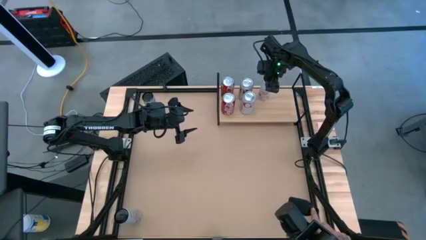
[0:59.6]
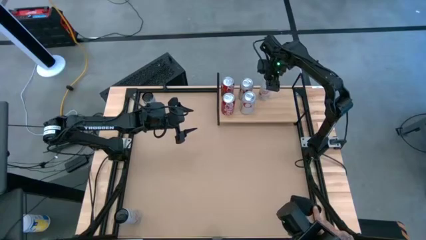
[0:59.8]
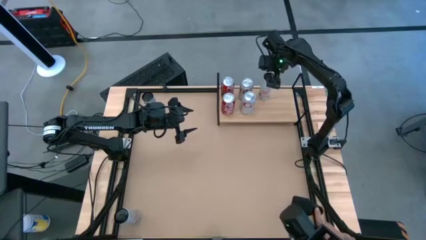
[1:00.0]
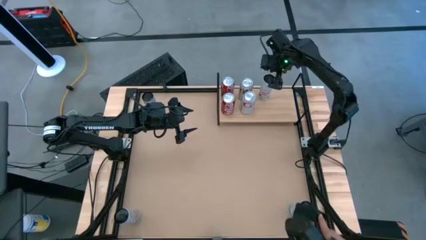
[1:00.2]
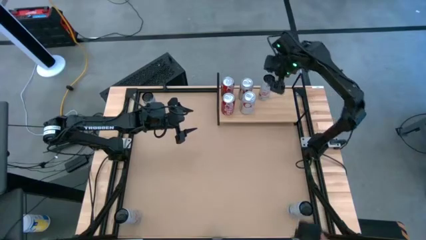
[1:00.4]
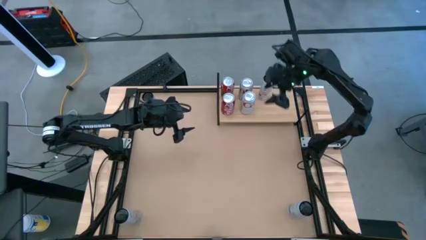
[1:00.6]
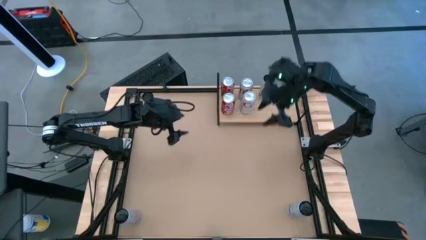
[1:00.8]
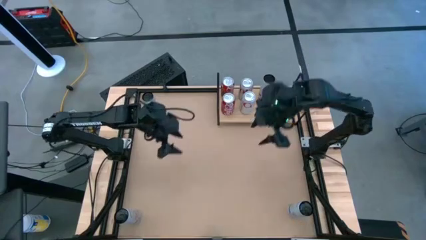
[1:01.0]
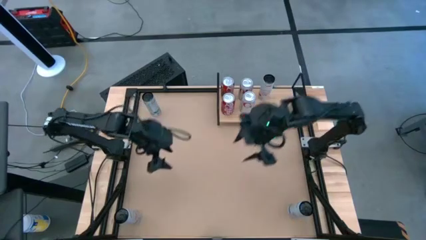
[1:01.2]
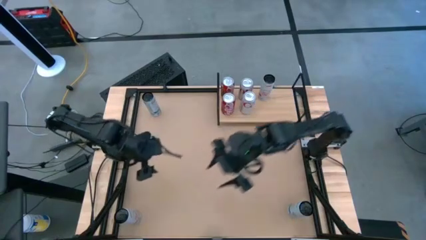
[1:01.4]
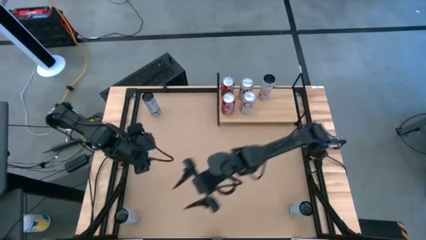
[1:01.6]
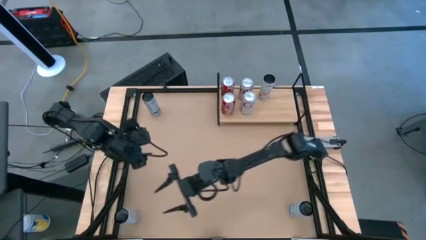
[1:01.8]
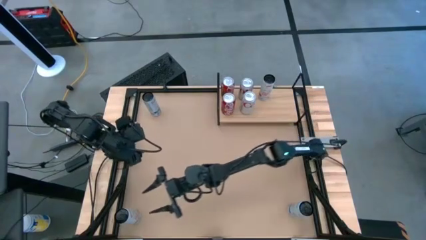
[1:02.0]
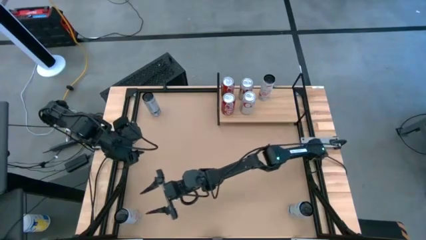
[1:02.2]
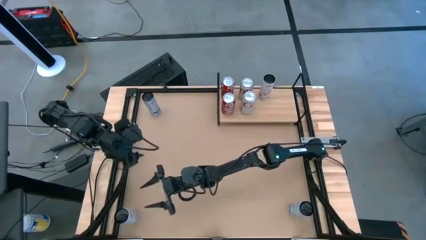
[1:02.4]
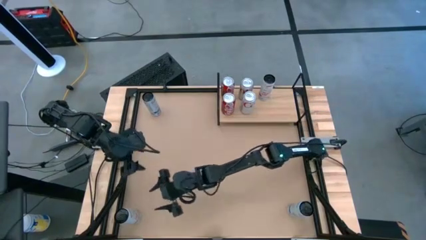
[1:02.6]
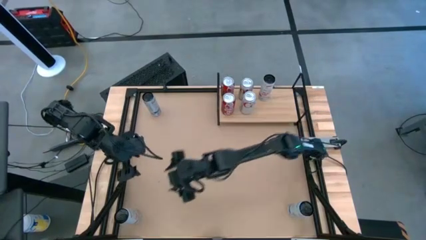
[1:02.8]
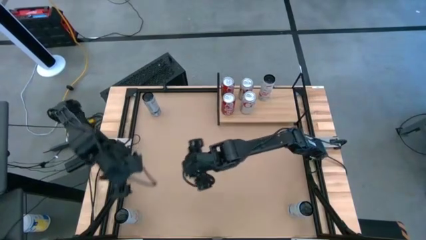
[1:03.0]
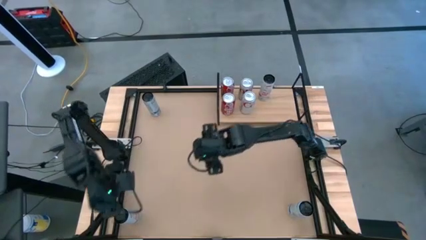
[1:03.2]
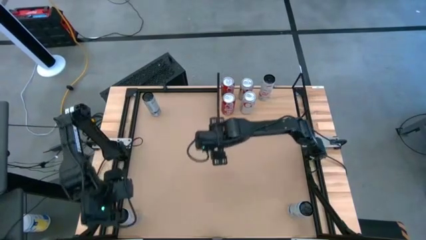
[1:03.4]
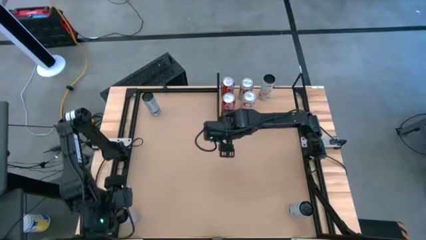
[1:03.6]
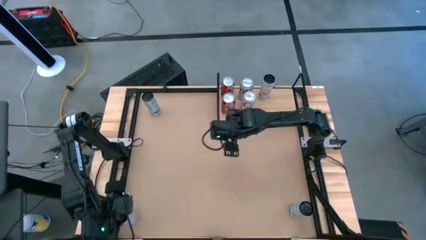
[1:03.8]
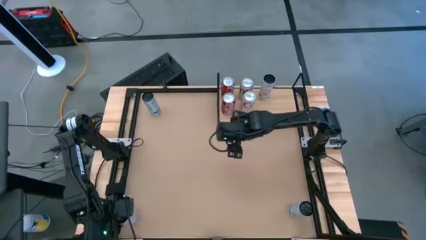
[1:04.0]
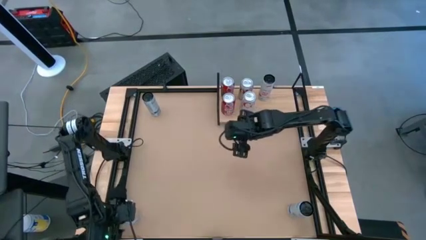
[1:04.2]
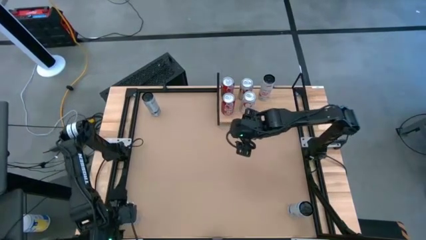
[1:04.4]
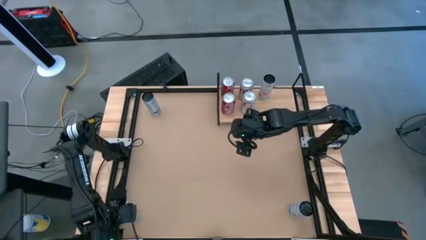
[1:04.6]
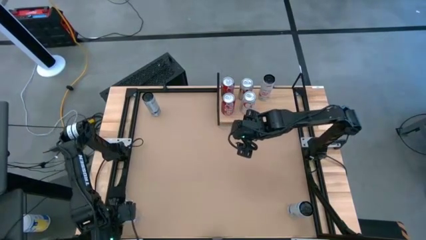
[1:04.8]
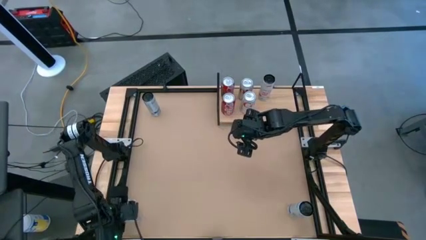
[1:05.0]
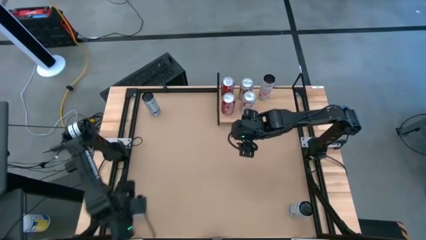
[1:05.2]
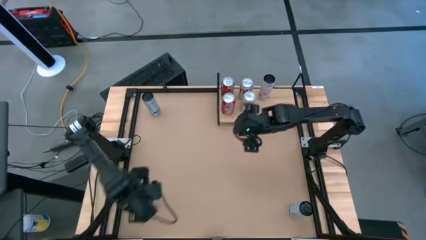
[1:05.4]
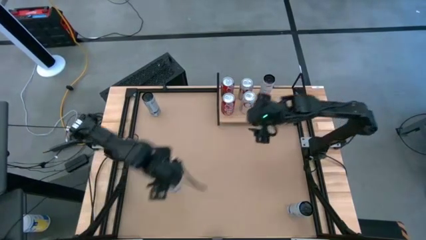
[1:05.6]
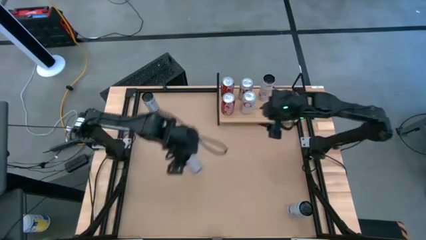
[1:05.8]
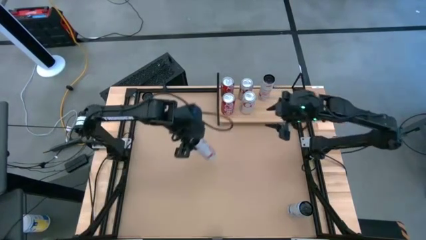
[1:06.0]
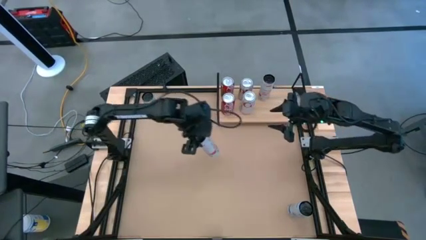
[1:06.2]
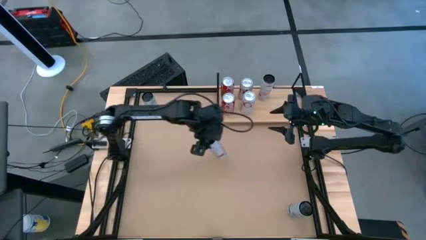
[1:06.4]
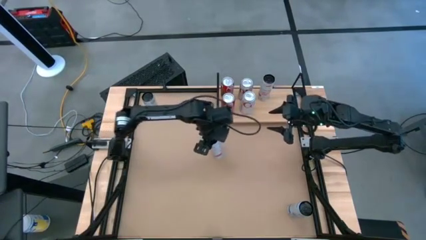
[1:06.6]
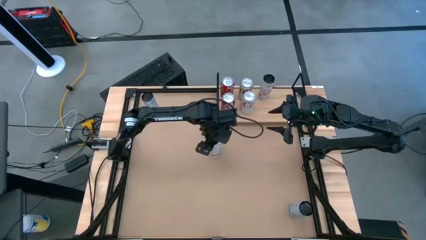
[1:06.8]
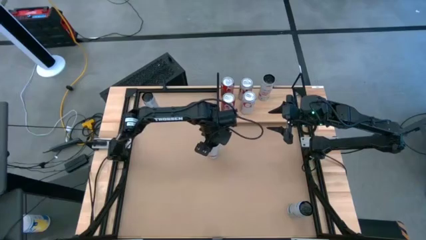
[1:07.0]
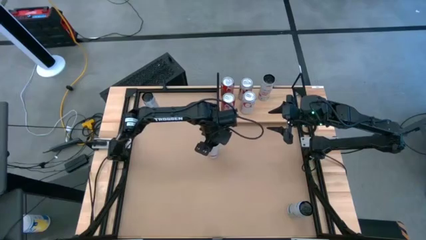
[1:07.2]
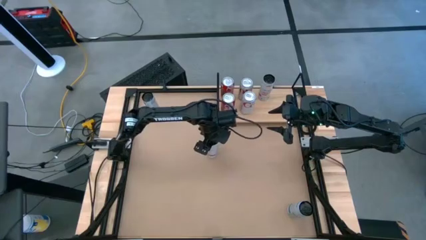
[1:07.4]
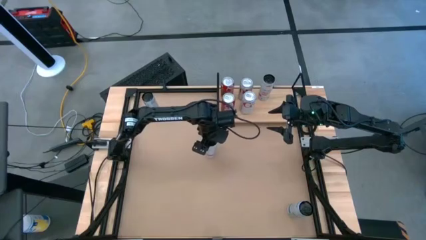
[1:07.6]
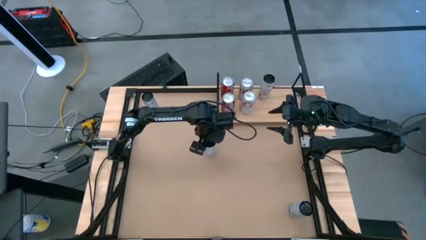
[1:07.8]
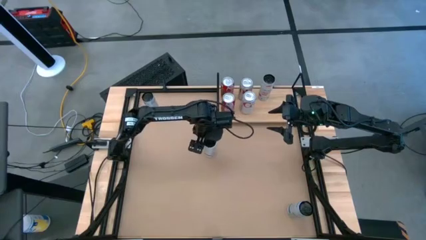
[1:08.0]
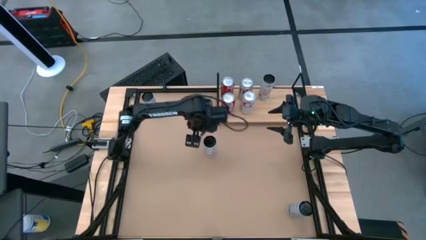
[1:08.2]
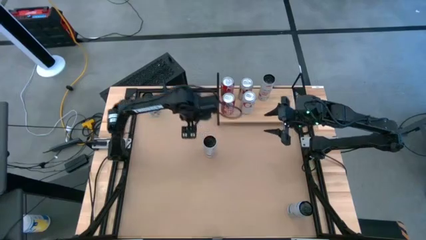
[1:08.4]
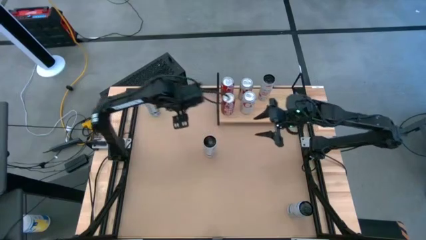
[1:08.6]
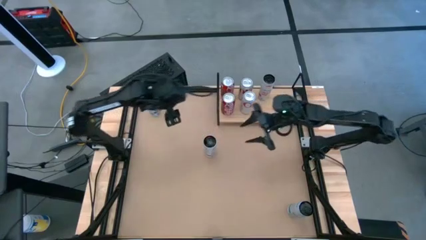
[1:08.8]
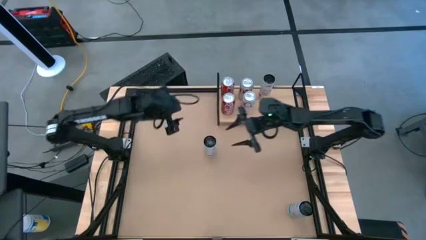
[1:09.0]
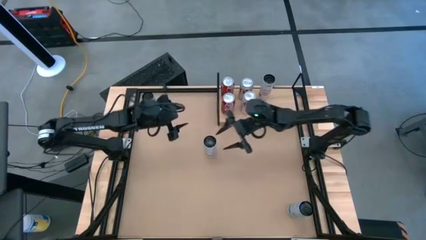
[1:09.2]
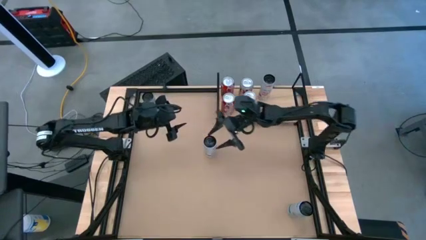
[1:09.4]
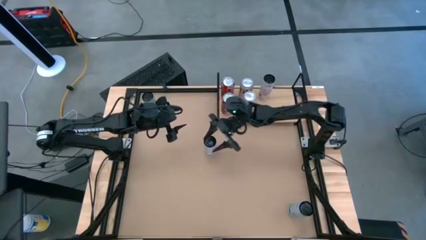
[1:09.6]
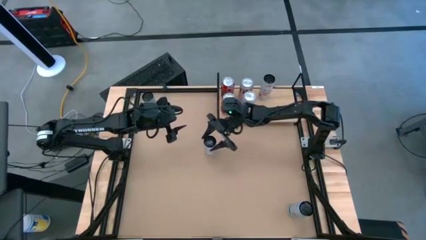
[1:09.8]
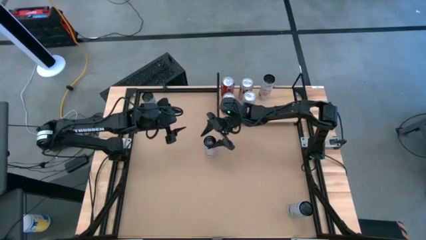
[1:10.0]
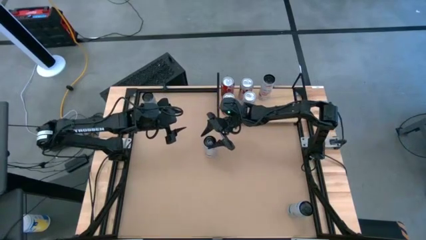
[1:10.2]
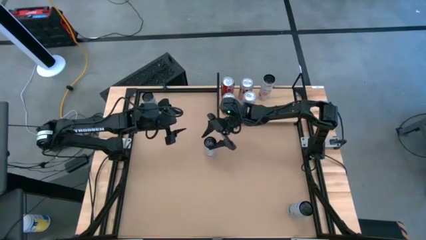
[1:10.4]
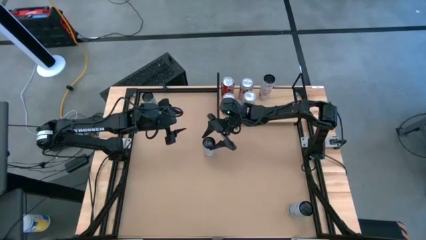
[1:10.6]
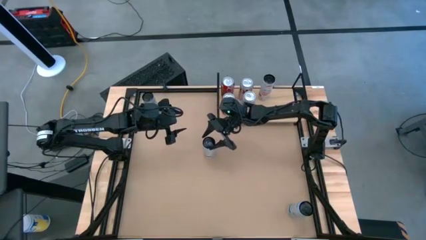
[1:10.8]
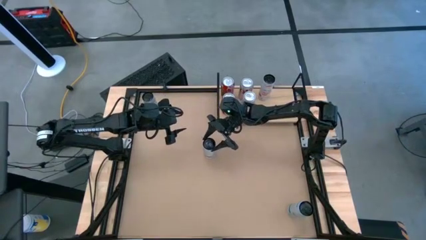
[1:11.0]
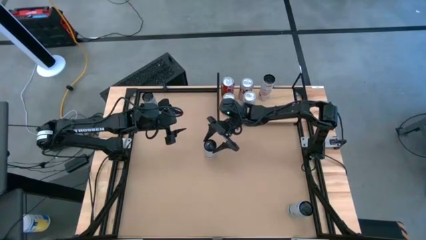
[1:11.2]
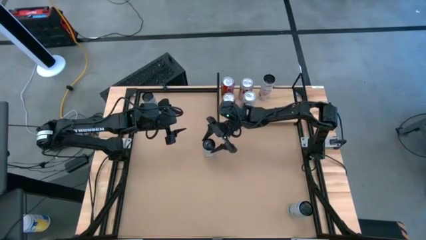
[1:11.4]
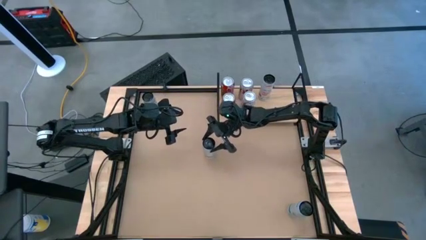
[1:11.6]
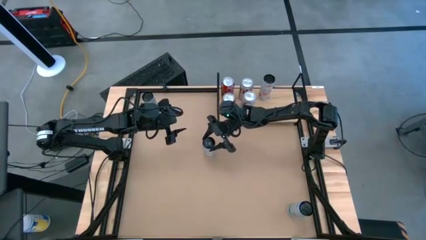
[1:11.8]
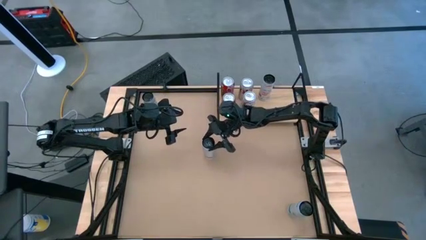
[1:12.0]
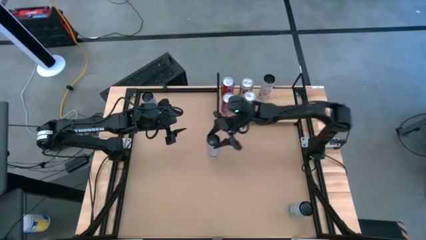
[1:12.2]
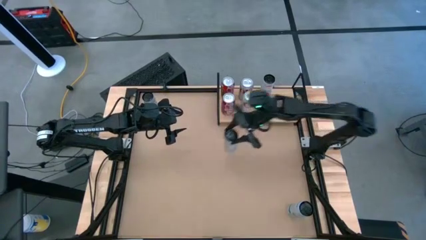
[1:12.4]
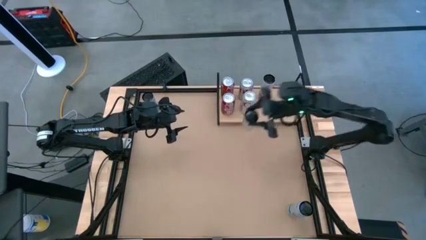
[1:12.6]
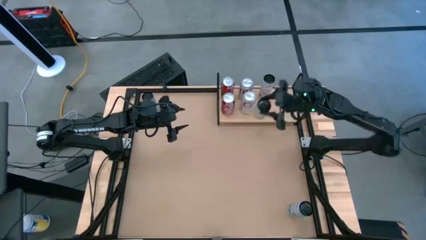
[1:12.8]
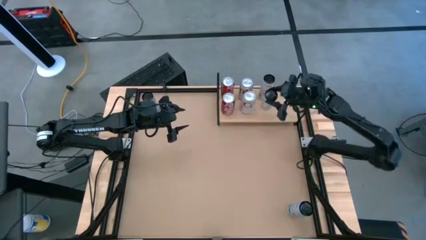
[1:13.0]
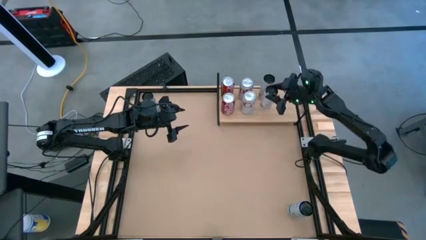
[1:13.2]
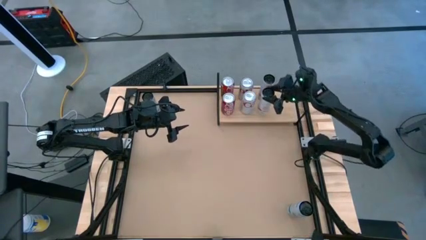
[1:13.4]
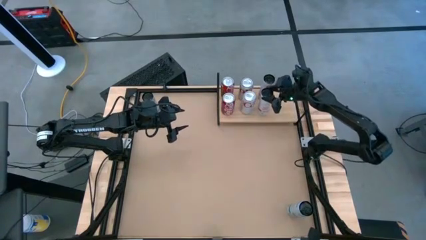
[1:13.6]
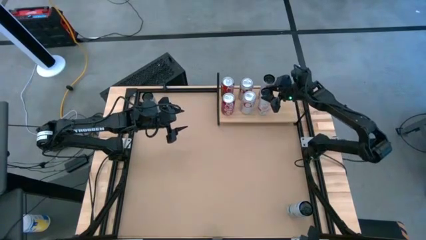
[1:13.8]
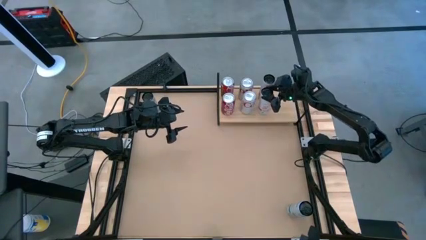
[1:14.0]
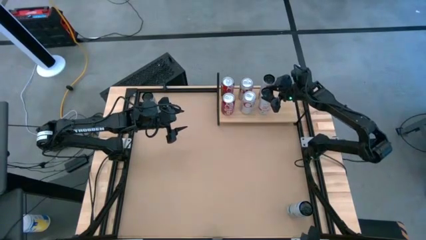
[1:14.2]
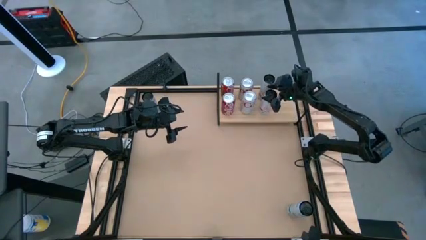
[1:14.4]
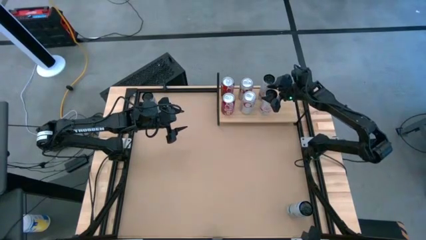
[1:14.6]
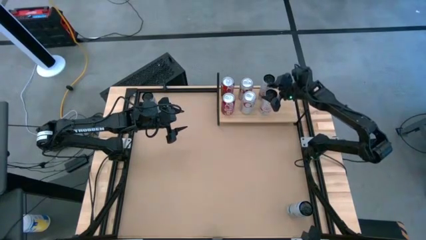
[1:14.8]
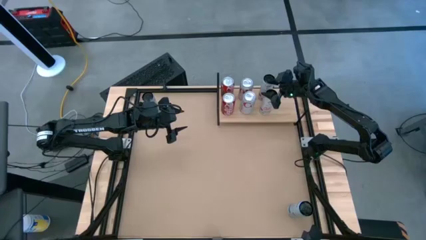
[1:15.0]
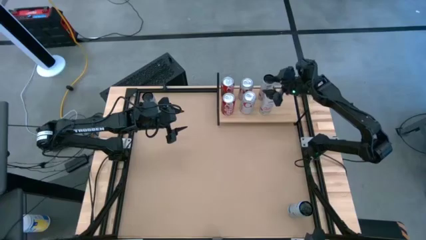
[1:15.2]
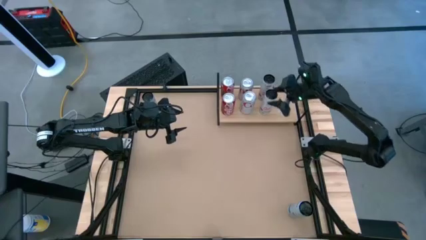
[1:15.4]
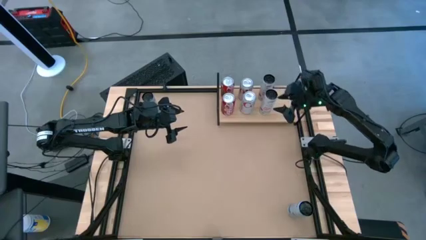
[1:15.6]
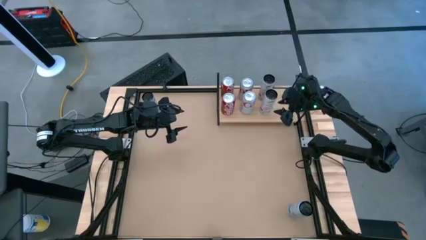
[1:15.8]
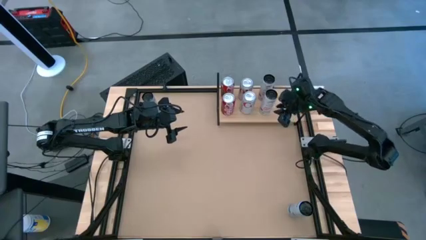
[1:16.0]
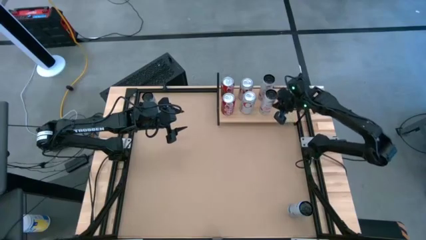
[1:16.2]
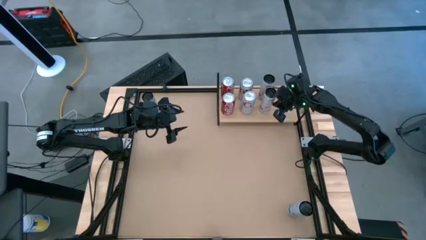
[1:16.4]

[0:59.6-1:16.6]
Task: Place canned beverage on shelf
Put the orange white soda can on the shelf aligned with the other orange white soda can
